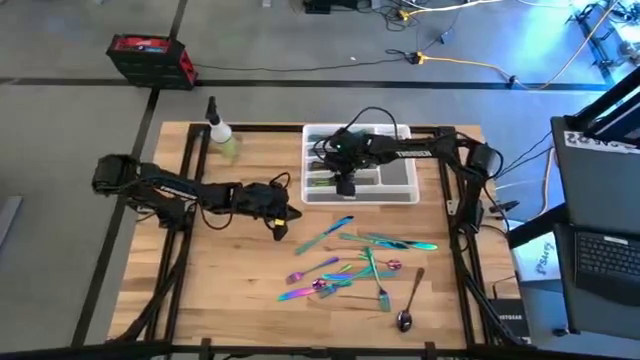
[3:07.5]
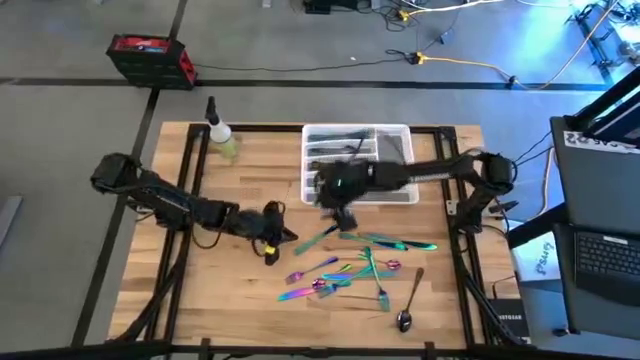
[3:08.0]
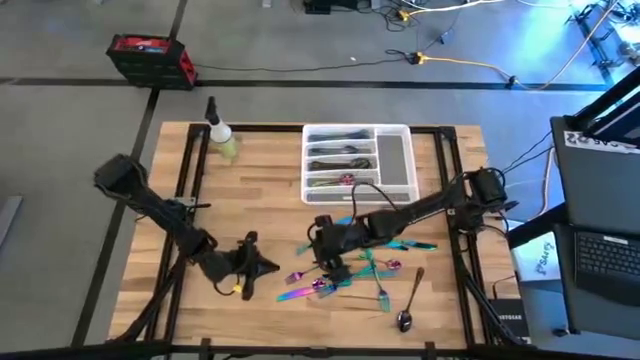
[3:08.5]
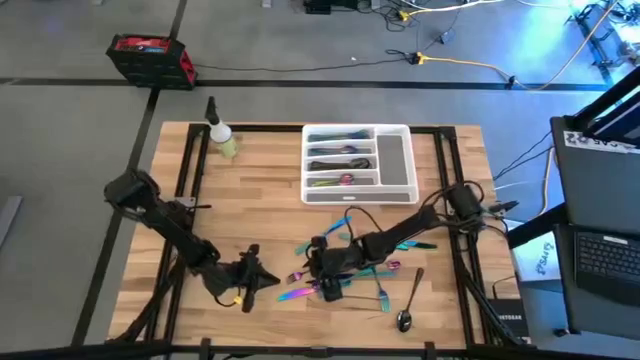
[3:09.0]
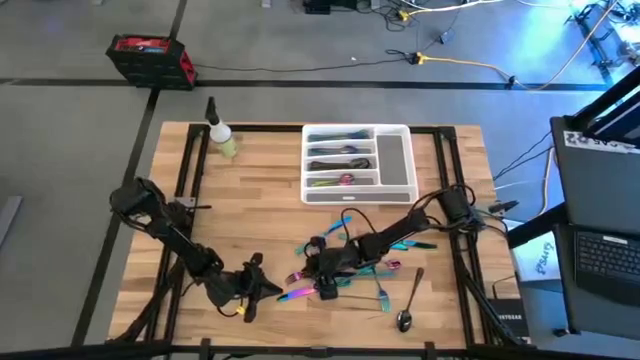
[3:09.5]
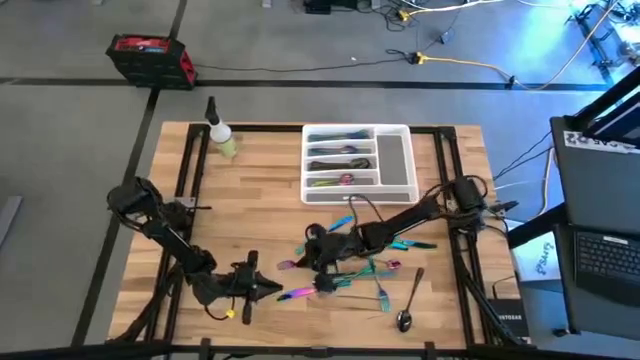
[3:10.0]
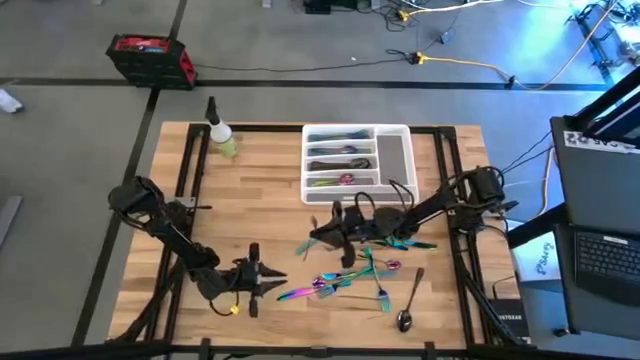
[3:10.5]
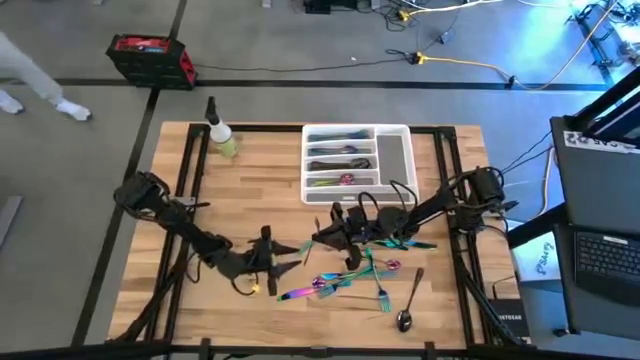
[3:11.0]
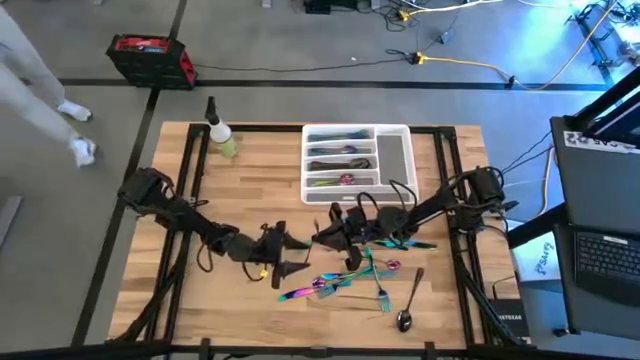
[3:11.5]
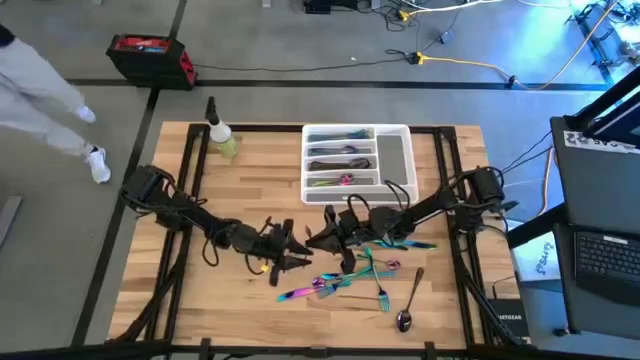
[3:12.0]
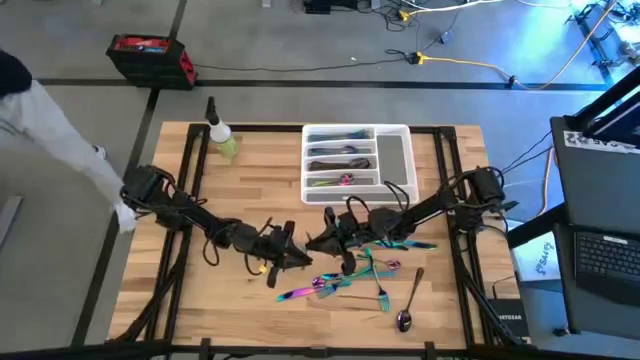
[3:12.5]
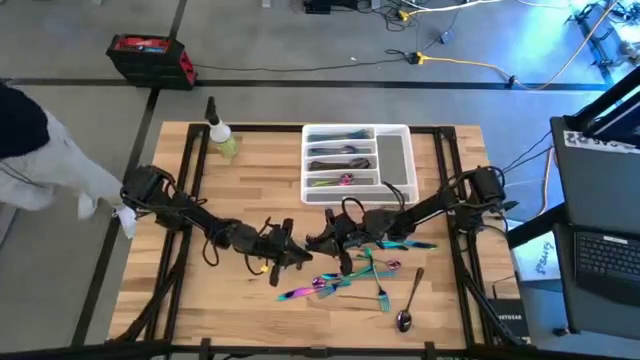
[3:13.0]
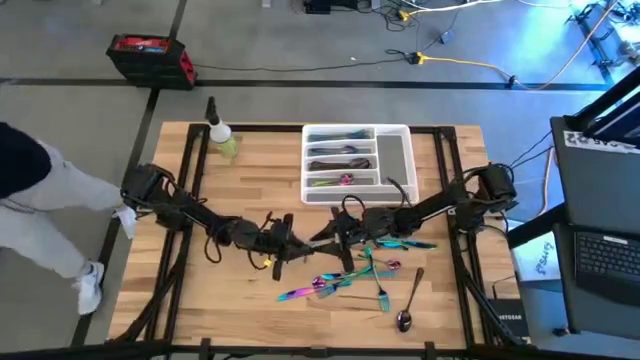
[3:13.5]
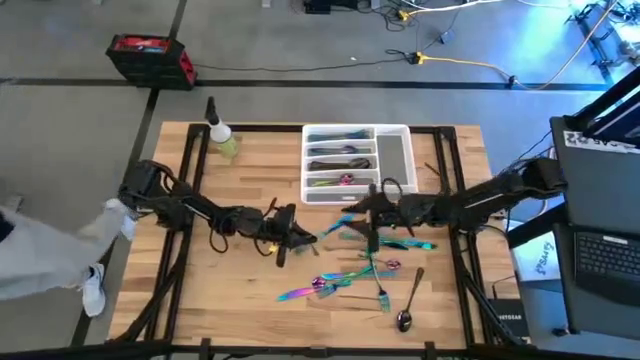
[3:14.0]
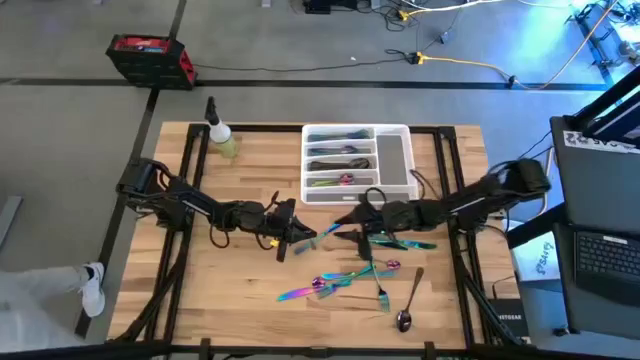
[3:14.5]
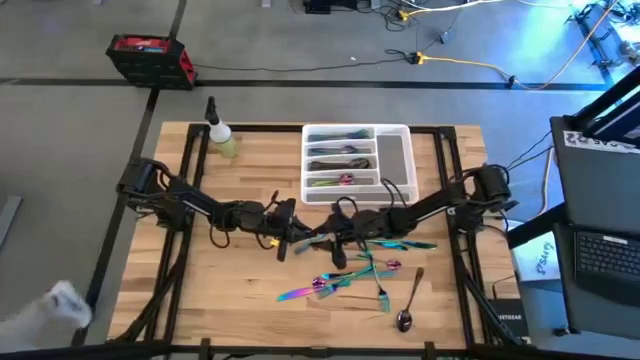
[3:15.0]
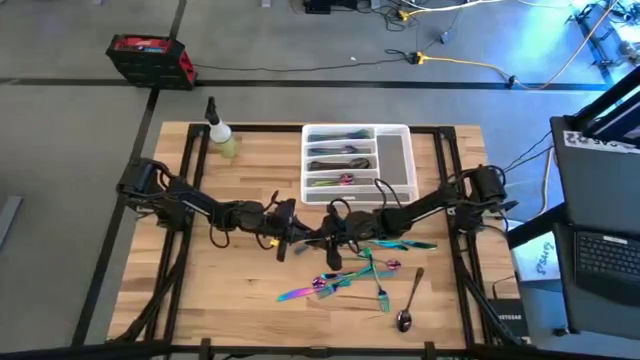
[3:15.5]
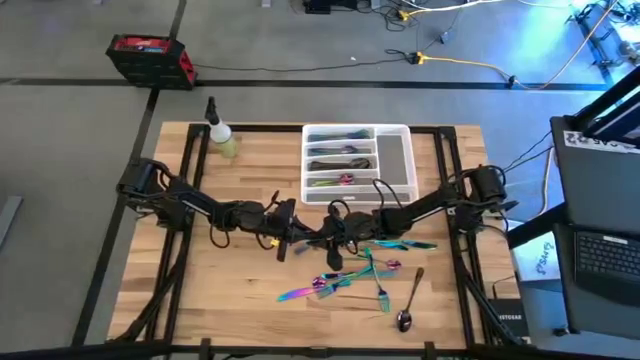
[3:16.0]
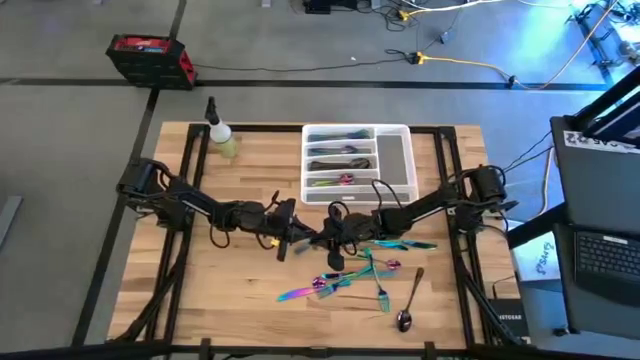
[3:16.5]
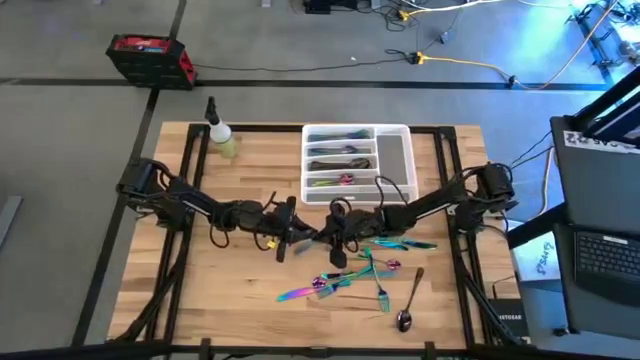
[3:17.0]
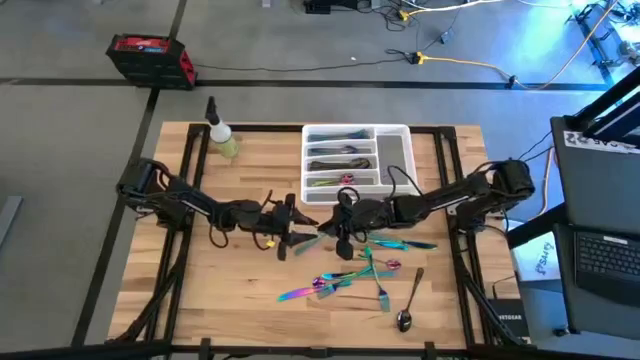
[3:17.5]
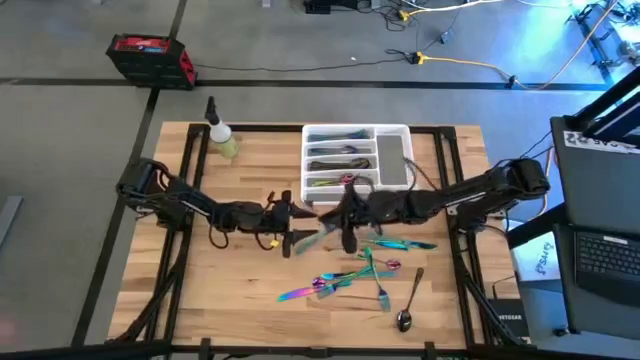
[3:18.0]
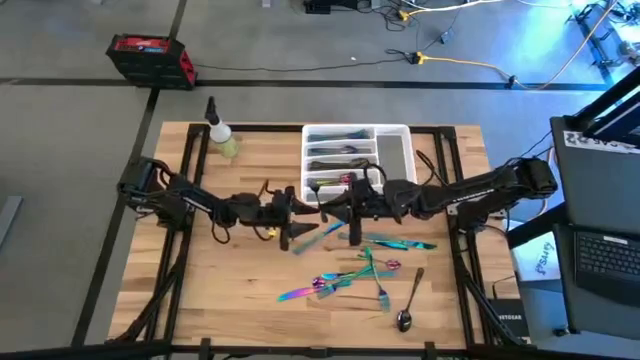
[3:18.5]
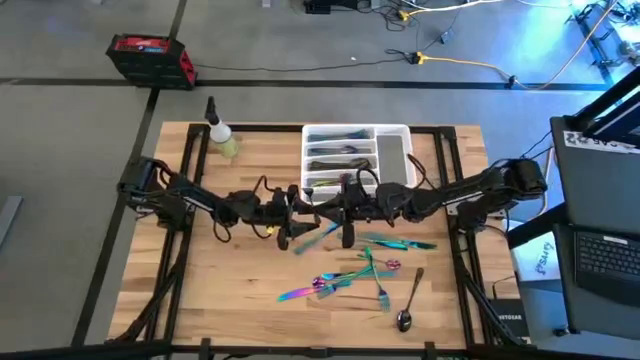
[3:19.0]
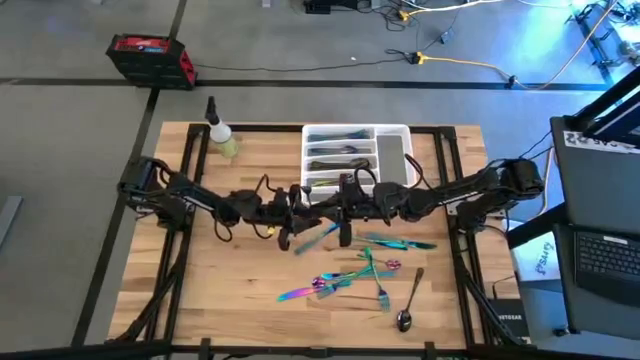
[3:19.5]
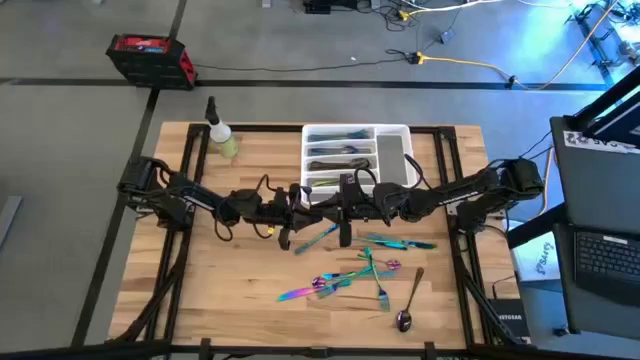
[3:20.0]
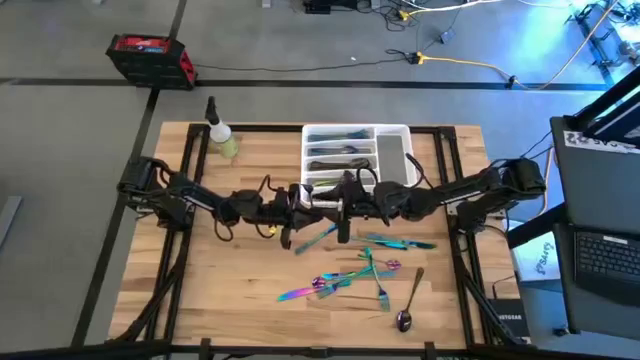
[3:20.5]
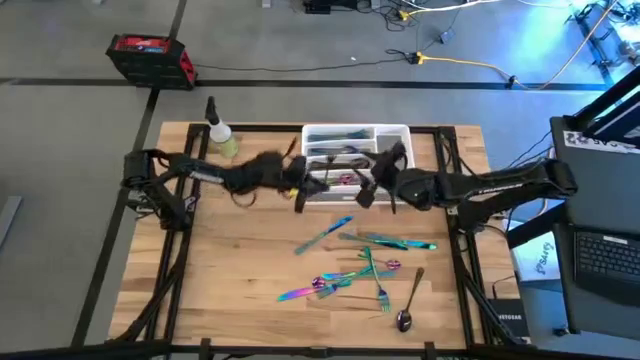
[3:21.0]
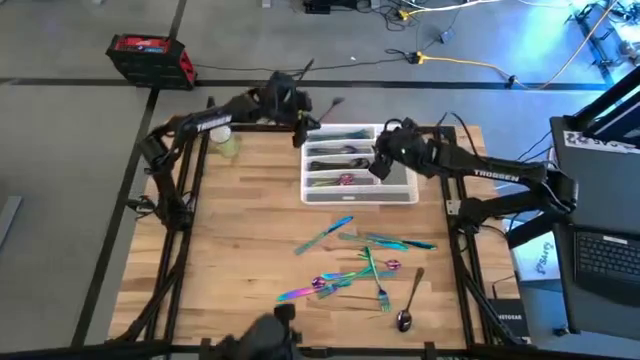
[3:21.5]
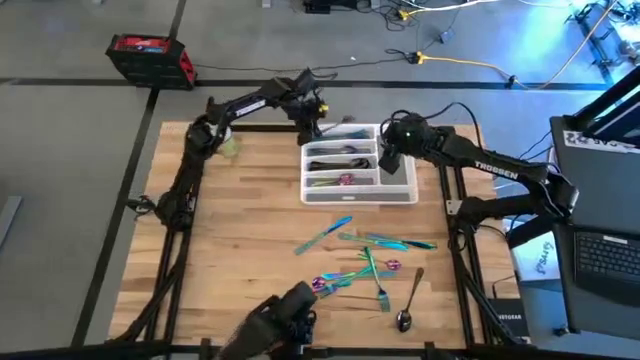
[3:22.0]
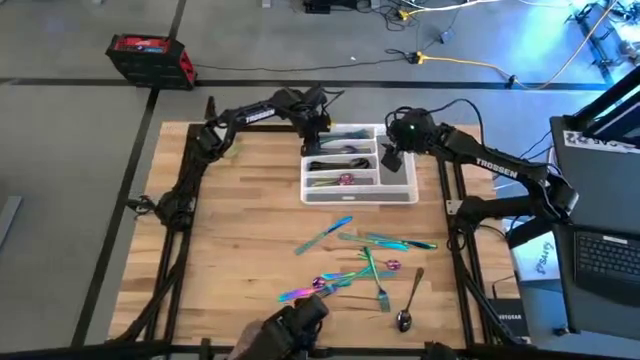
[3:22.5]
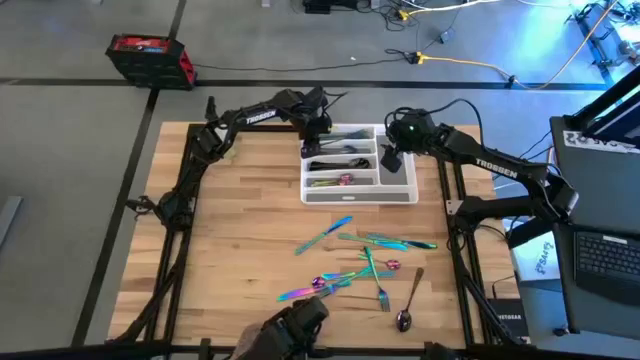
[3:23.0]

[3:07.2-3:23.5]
Task: Sort silverware
Put the blue fork on the white silverware tray

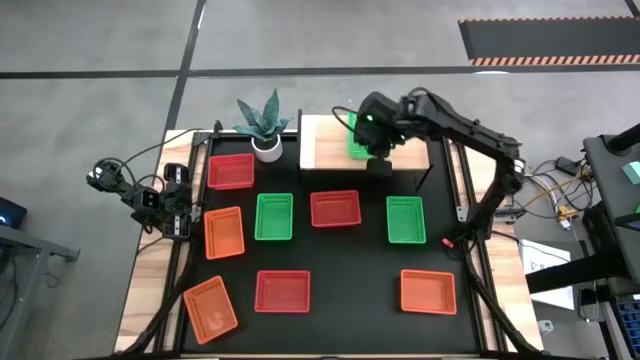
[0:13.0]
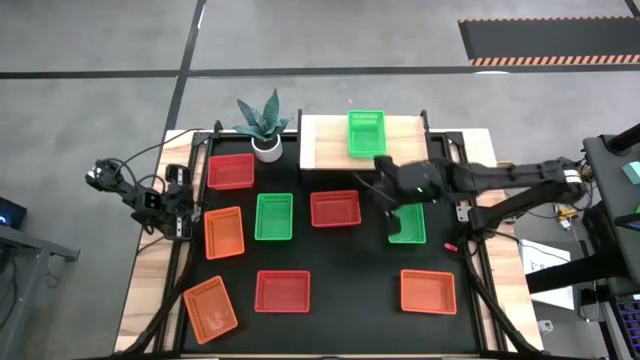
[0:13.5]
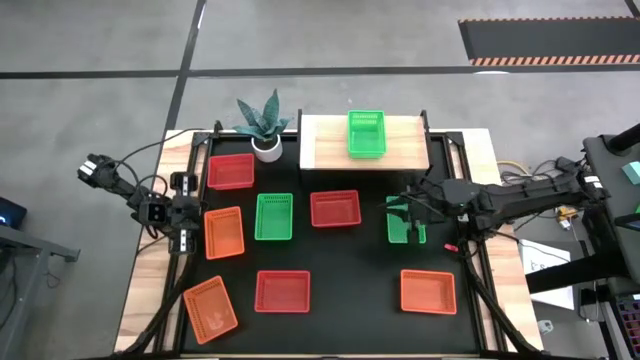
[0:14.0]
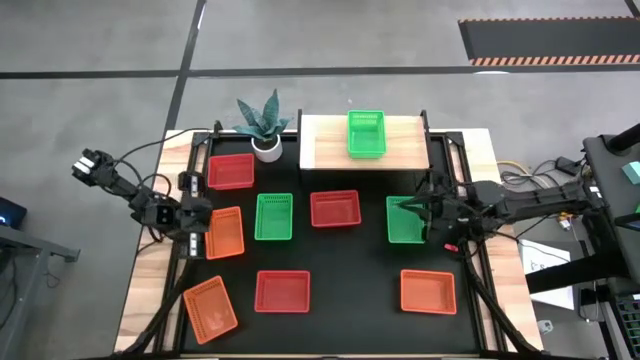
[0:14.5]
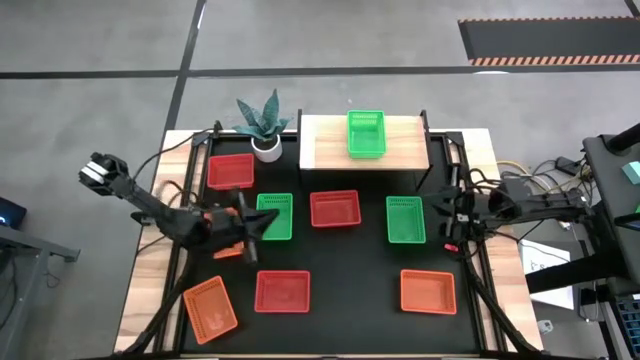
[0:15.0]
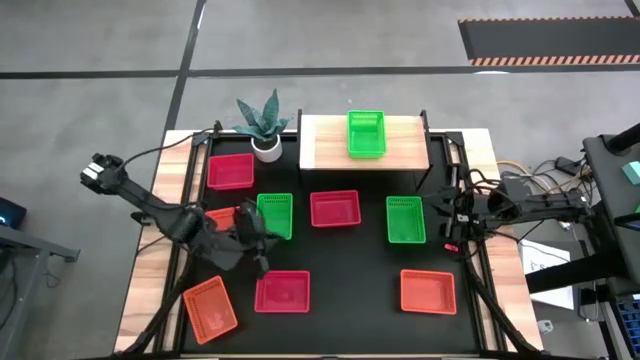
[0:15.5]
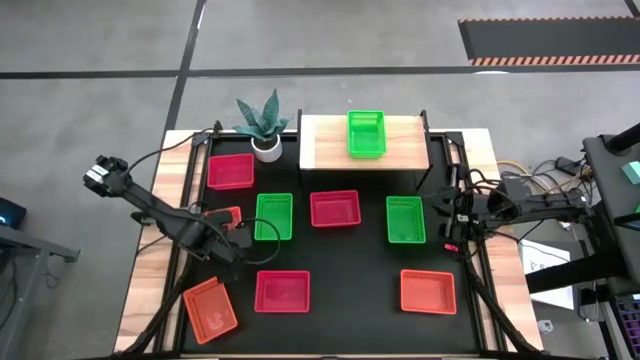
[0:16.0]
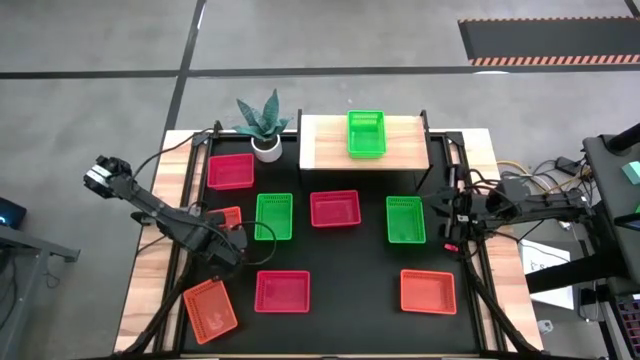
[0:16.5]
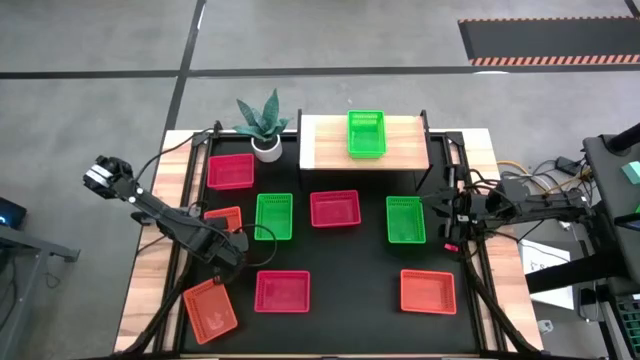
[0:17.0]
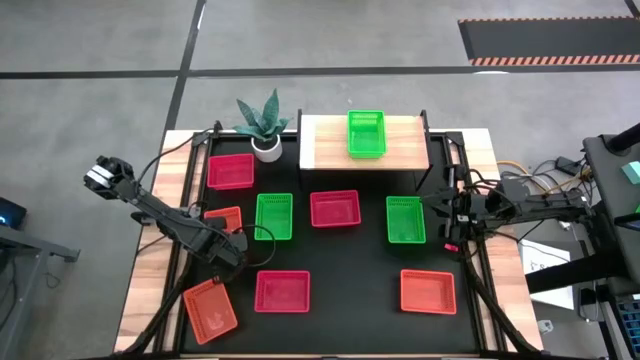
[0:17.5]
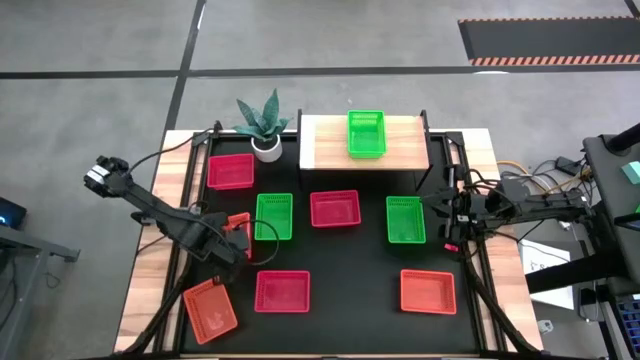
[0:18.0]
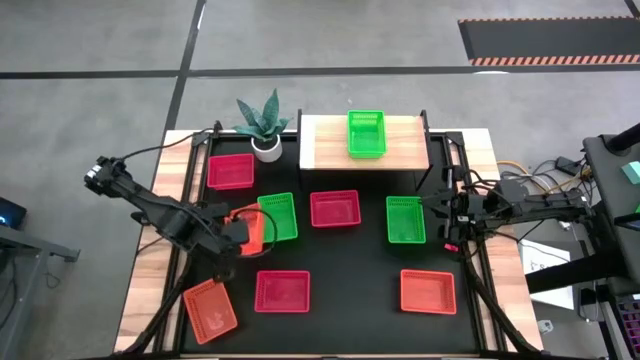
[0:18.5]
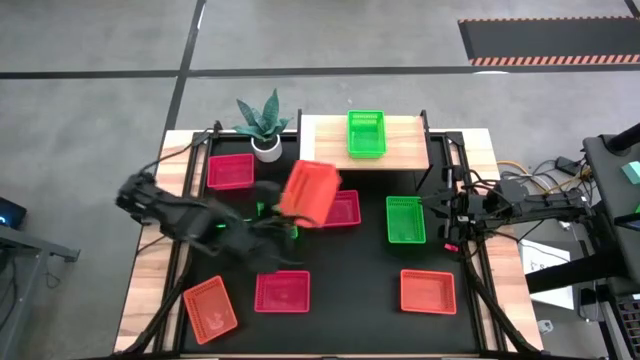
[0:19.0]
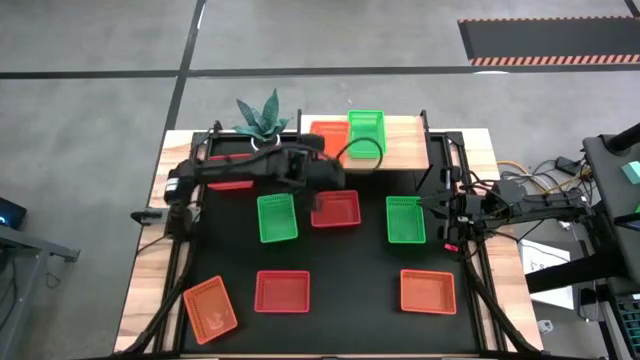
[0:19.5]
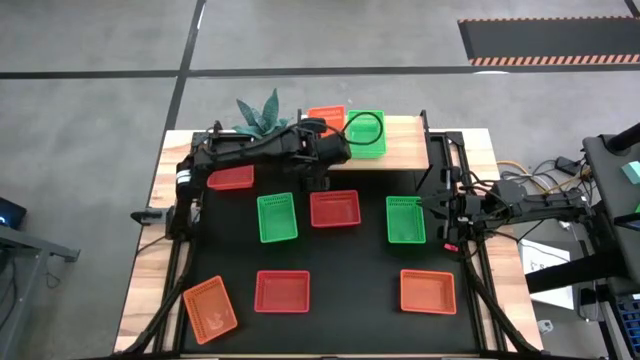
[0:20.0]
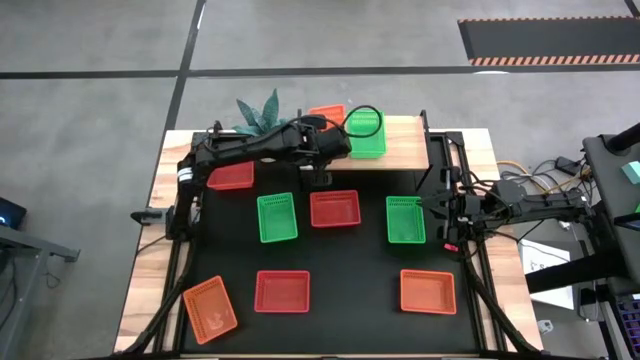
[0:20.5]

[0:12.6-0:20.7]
Task: Stack baskets on shelf by color
Put the top left orange bin on the shelf
